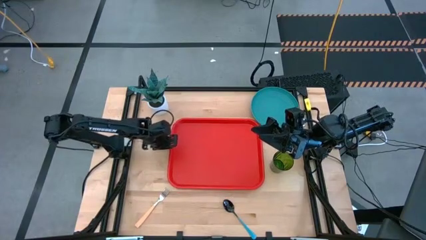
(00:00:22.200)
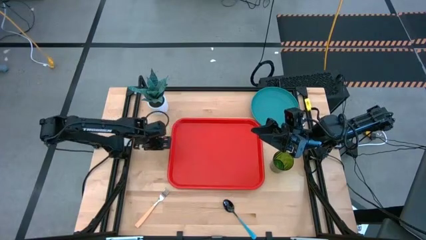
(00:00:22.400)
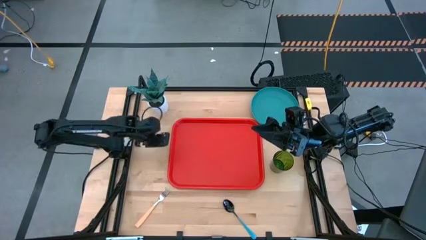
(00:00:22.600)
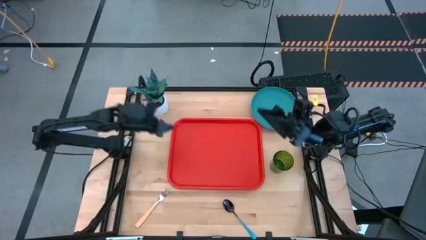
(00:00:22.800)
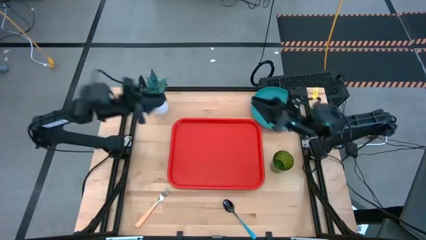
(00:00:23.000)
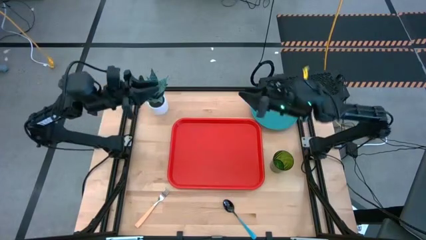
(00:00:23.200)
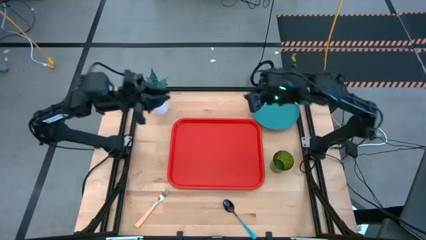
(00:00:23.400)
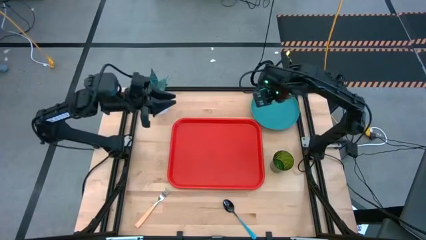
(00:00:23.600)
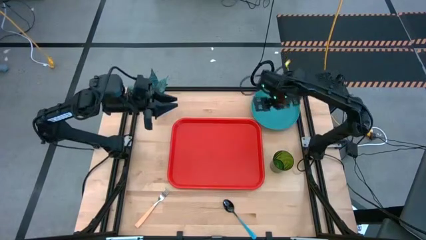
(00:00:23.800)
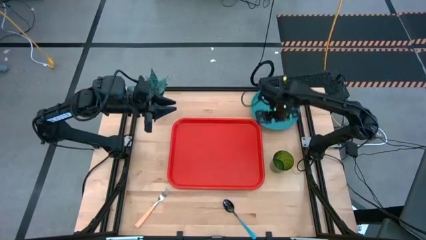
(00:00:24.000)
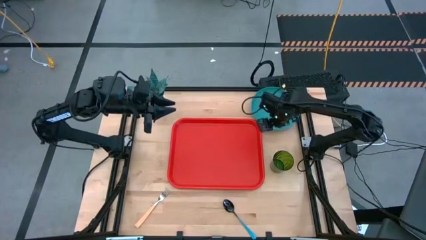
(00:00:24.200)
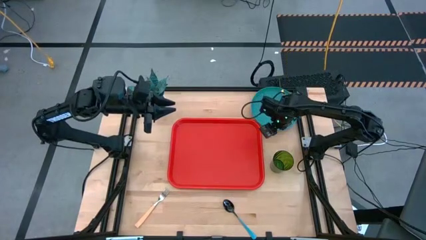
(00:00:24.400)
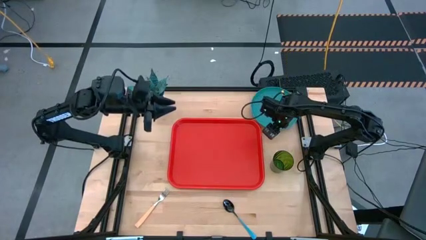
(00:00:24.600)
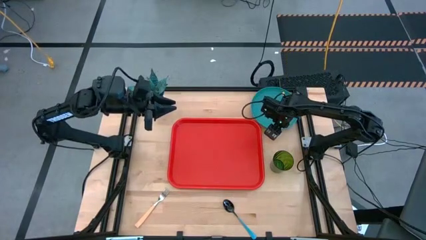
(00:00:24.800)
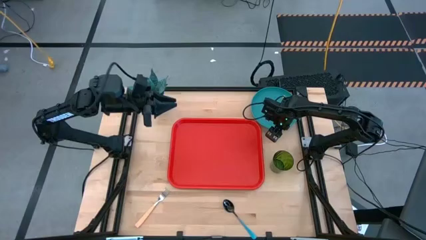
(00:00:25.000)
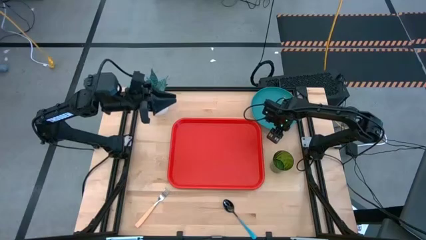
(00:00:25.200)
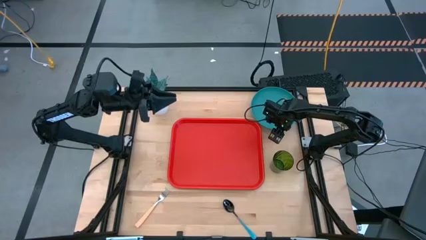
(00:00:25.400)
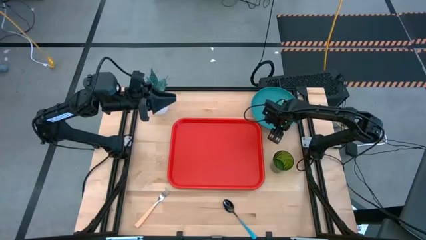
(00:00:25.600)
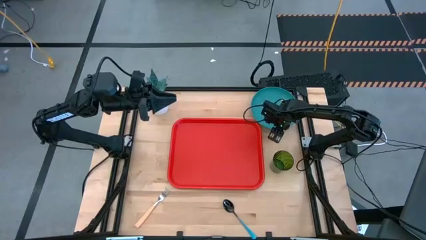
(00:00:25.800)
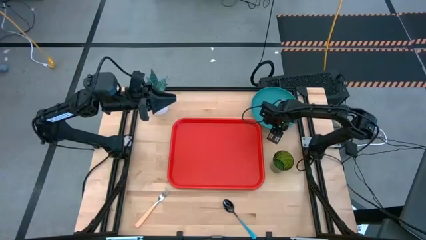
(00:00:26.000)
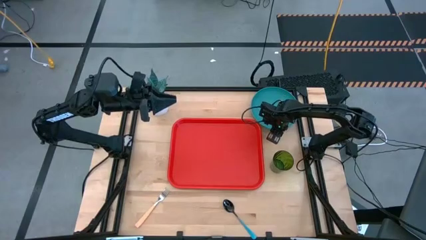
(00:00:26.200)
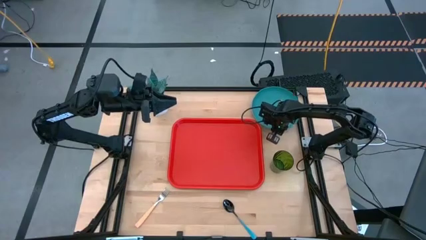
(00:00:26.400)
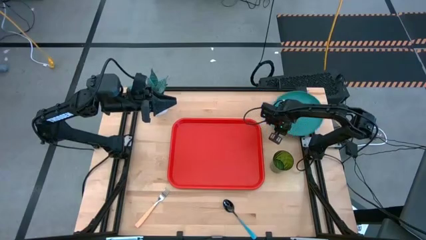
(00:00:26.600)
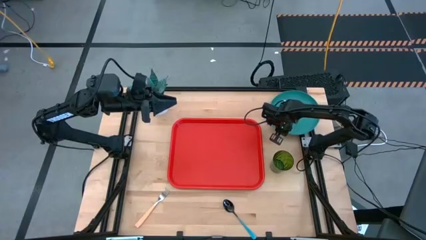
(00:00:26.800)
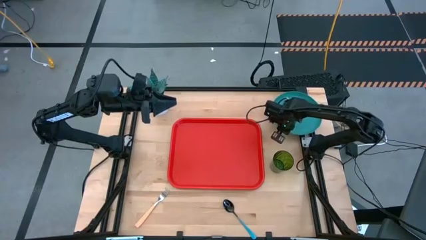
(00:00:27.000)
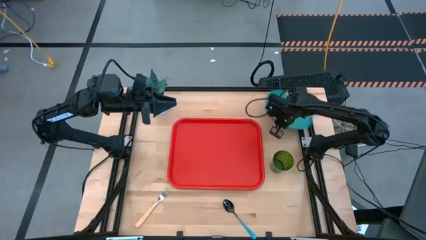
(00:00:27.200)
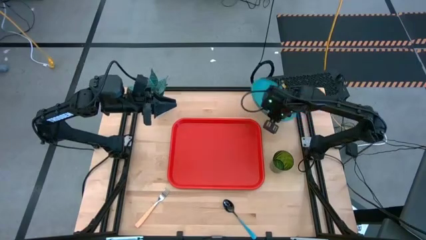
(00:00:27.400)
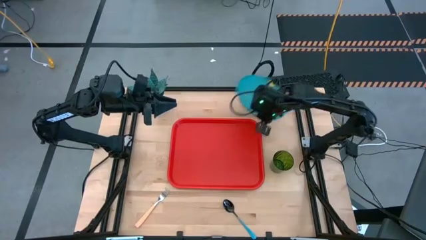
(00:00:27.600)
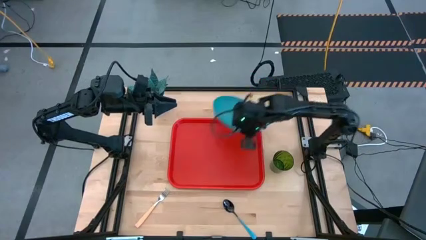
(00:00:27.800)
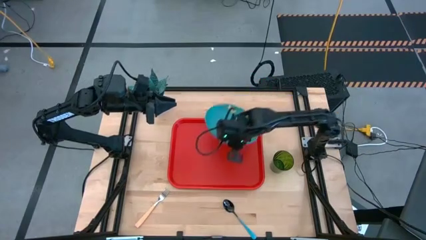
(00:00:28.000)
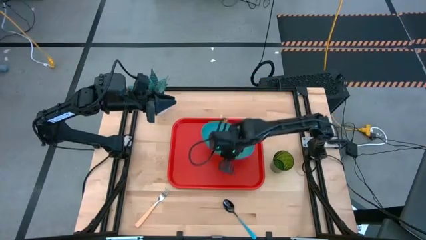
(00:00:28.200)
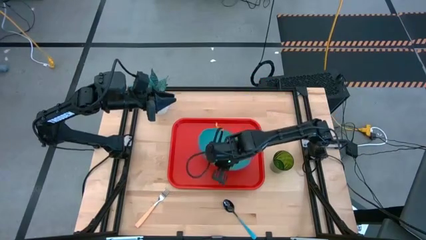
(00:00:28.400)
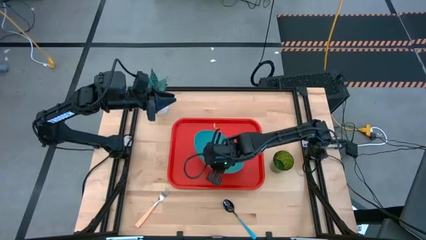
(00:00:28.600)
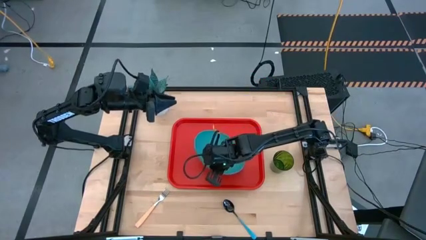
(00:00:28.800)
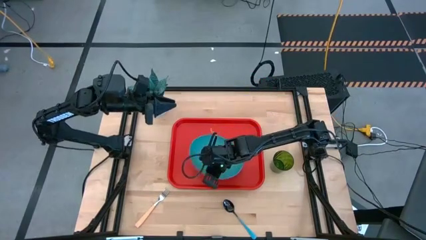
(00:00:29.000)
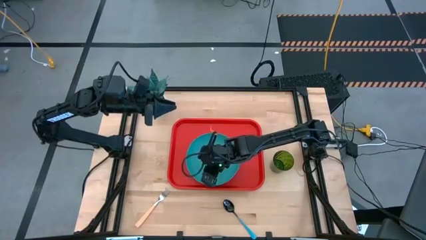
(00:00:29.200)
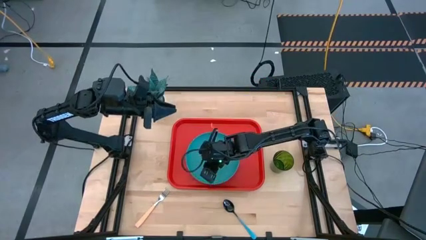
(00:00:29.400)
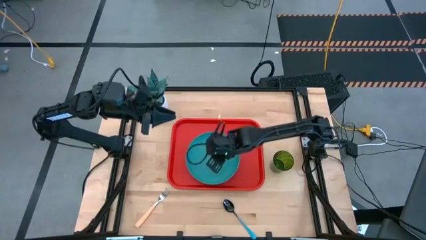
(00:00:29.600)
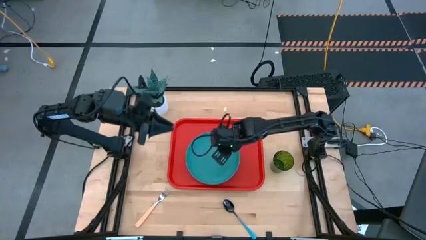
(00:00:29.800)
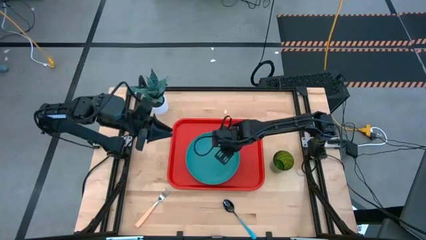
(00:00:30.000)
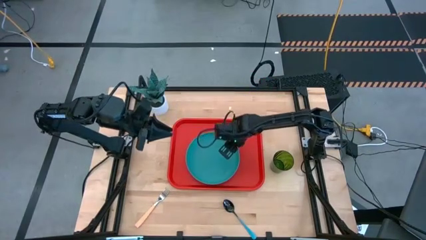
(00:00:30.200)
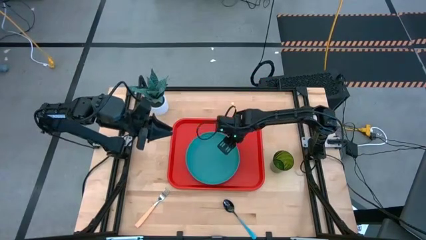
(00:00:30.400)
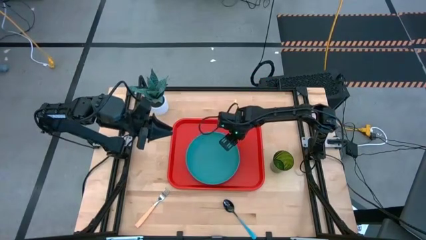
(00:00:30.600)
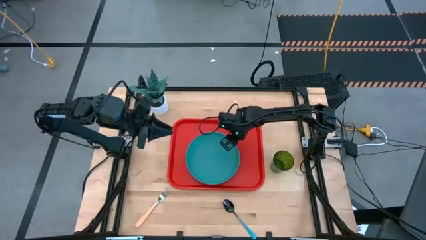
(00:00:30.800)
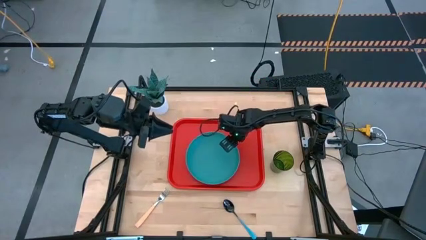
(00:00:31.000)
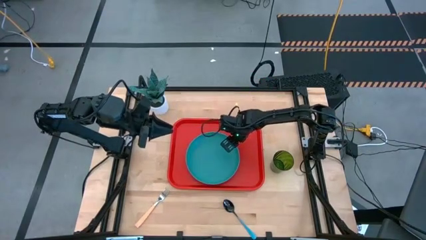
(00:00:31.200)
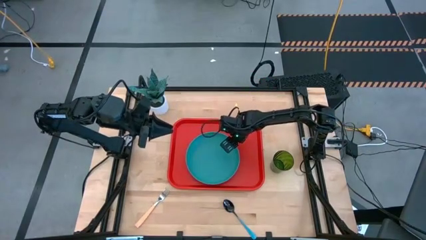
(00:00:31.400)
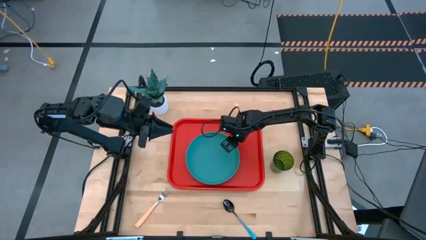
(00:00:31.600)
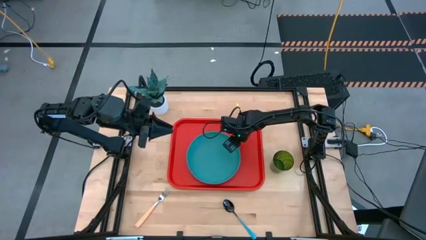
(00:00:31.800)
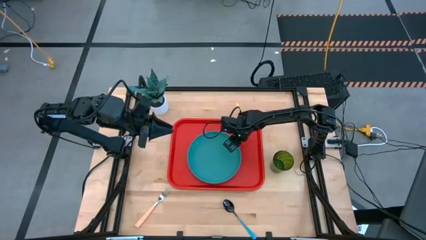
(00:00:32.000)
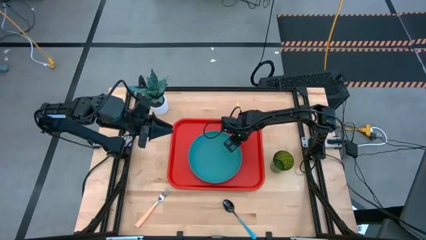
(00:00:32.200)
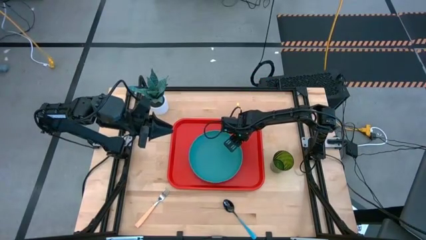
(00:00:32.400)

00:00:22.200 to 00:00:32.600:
Task: Pick and place plate/cup/fork/spoon on tray
Put the blue plate on the red tray

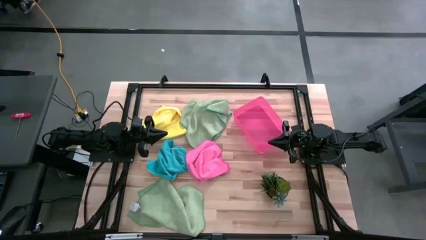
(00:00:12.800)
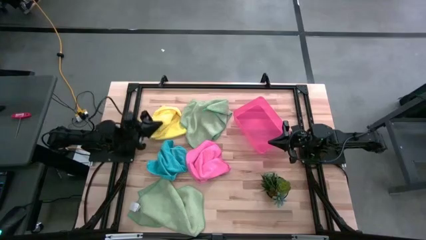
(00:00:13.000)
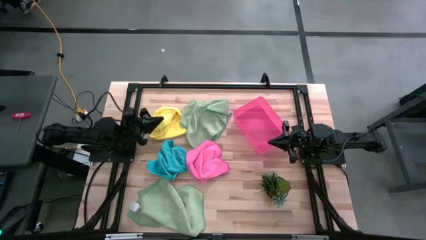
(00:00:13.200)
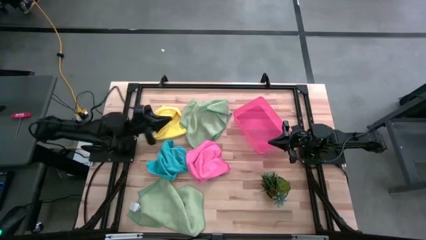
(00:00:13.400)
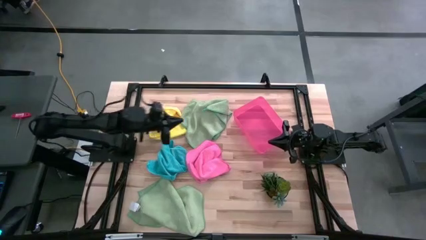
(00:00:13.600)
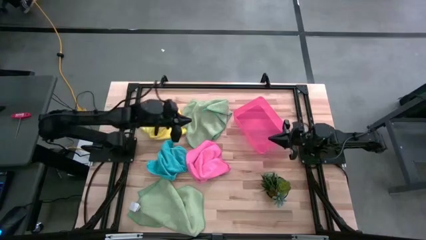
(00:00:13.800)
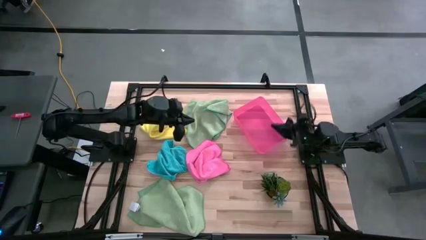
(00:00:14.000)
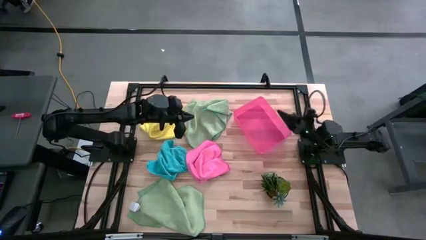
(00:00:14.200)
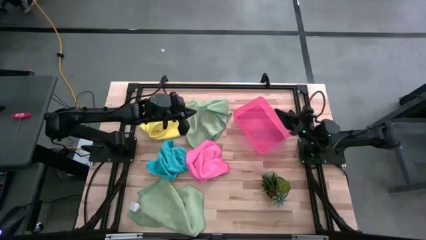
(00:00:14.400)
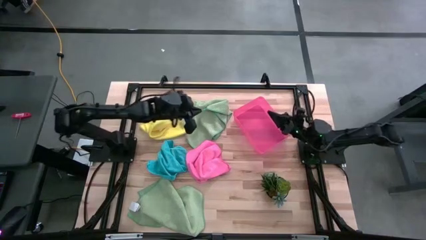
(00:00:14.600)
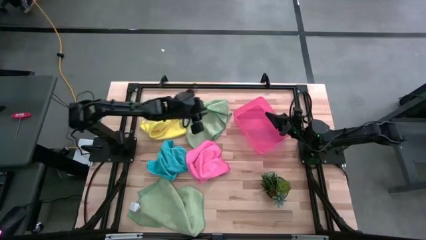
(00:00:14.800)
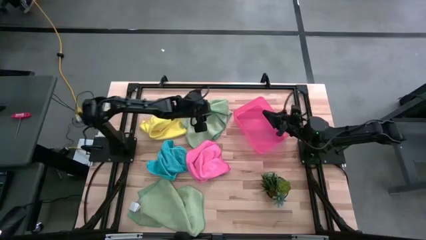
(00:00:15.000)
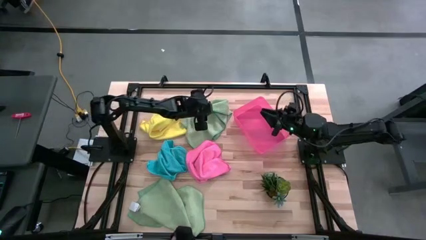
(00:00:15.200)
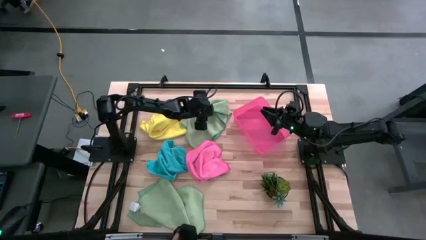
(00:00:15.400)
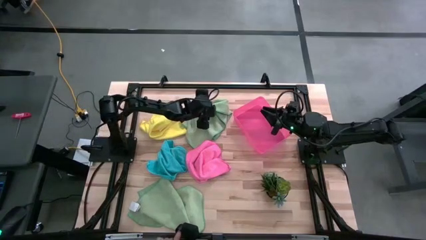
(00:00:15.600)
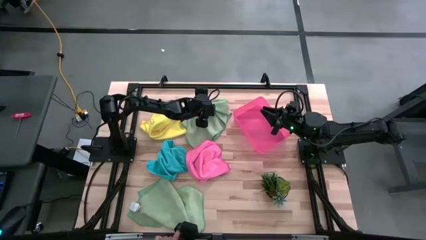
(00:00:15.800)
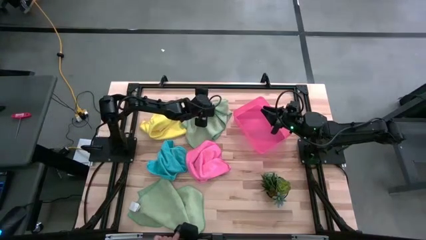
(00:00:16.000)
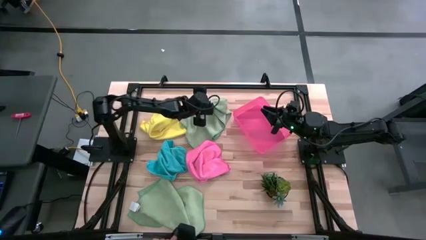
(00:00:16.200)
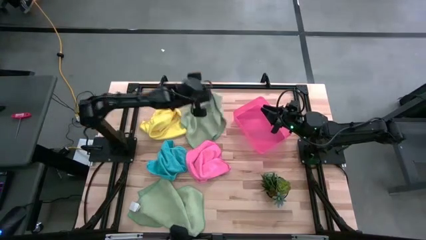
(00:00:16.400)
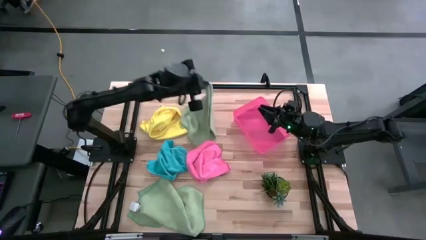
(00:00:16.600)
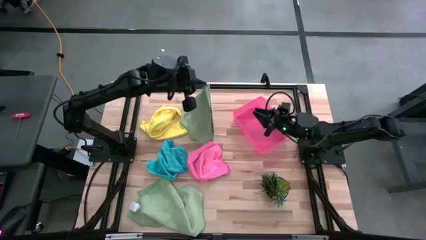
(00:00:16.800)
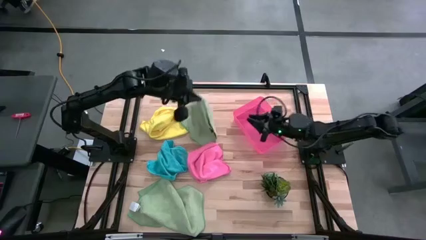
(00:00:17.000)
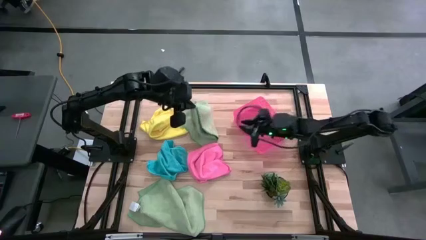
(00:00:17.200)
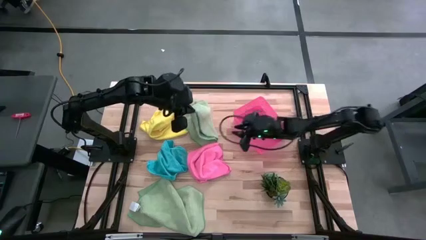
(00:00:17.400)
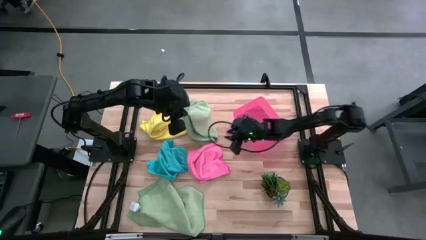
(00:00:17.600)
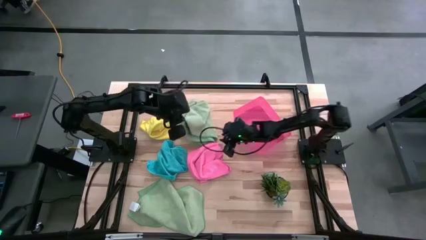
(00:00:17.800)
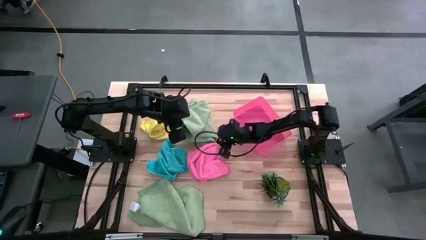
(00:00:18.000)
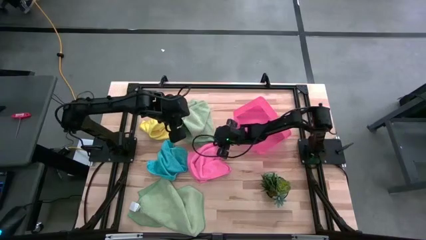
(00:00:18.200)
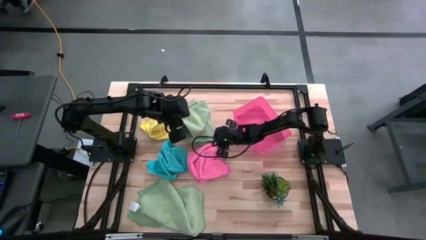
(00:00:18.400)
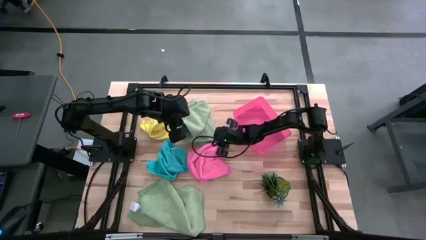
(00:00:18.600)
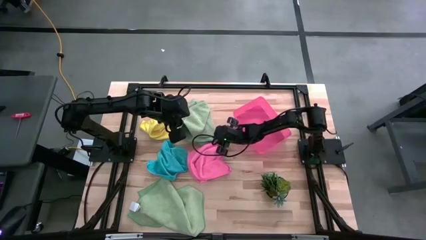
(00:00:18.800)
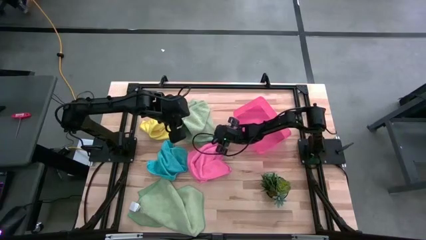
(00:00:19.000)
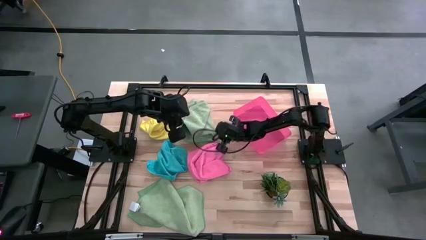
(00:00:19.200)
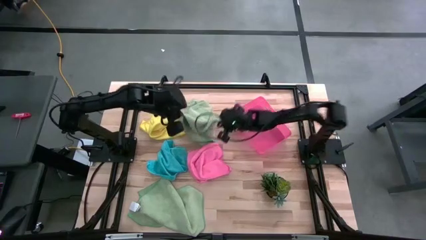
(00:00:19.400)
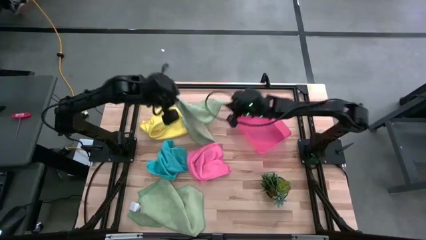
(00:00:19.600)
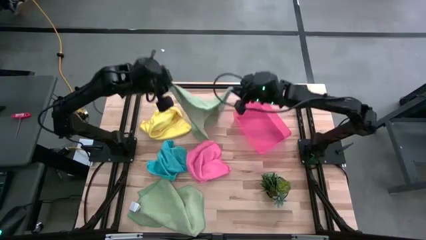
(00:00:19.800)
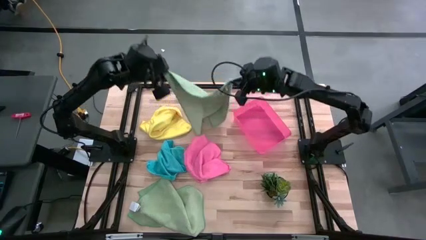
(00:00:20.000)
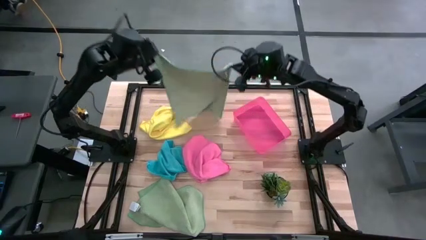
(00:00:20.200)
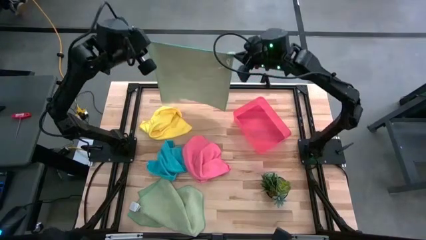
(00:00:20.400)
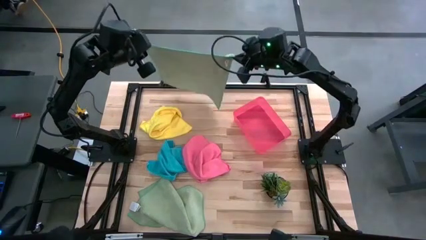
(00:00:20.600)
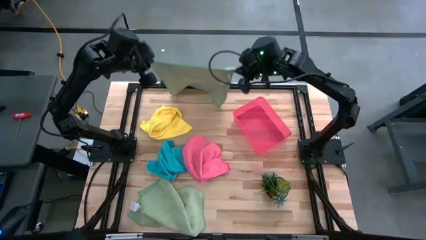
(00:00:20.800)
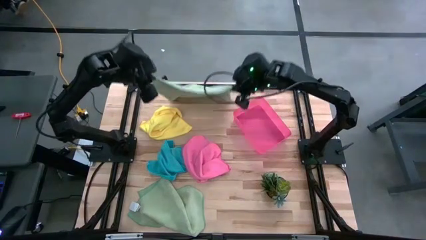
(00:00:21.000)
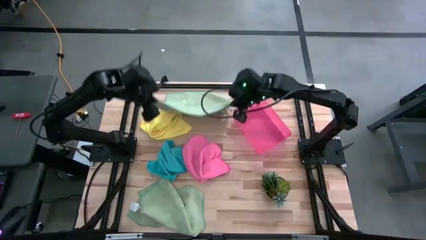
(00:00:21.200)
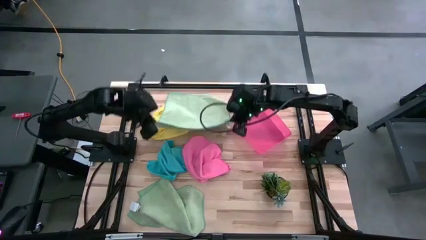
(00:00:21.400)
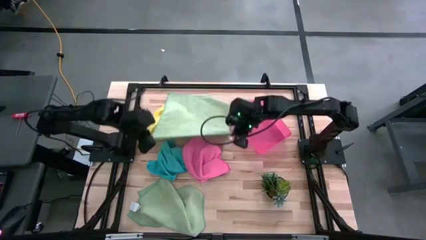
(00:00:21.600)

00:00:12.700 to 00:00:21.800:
Task: Fold microfiber towels
Fold the top light green microfiber cloth
